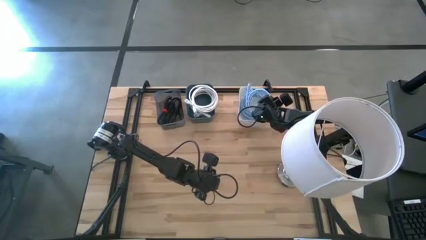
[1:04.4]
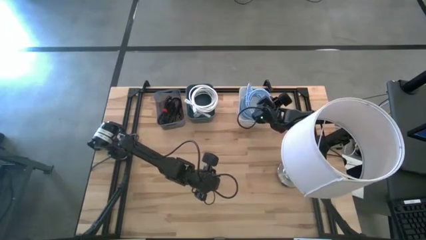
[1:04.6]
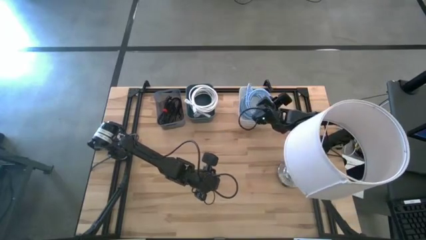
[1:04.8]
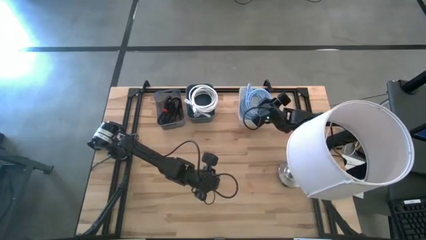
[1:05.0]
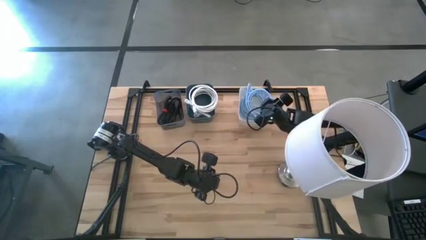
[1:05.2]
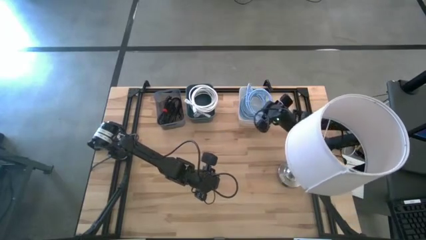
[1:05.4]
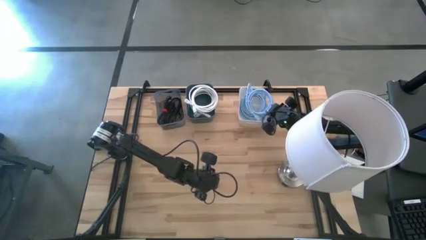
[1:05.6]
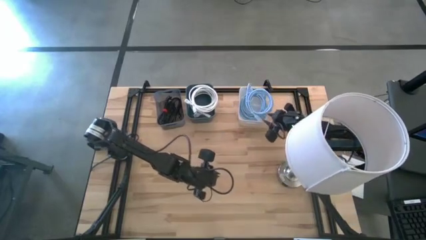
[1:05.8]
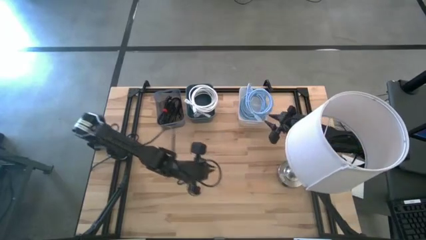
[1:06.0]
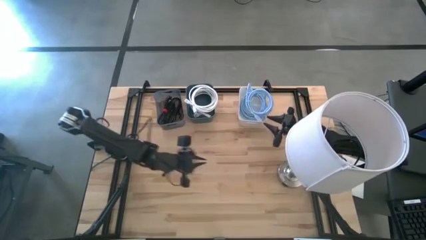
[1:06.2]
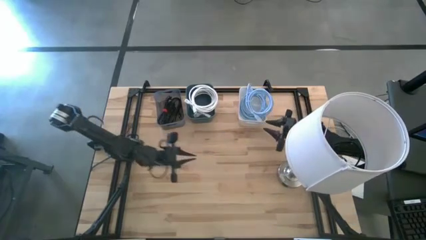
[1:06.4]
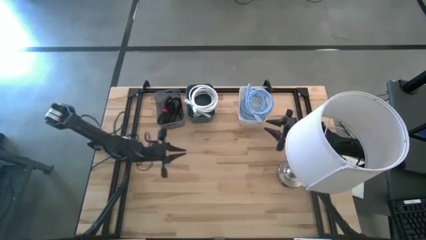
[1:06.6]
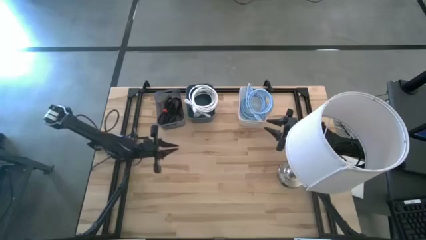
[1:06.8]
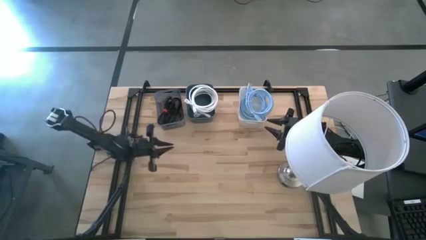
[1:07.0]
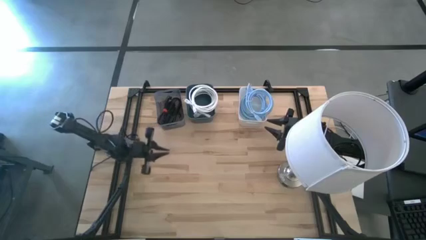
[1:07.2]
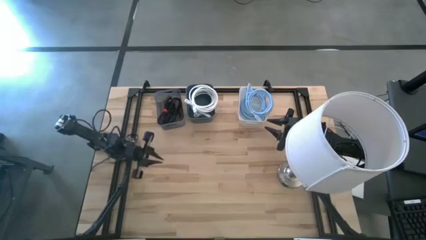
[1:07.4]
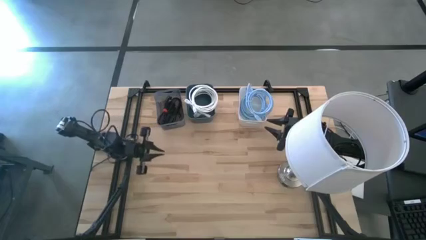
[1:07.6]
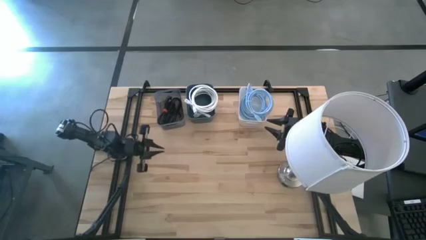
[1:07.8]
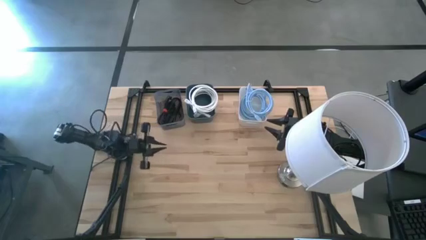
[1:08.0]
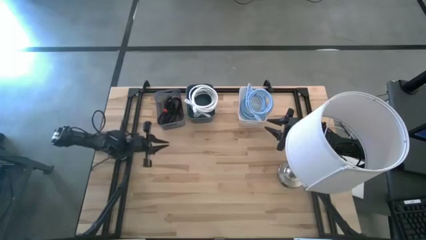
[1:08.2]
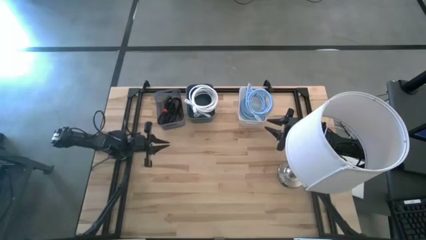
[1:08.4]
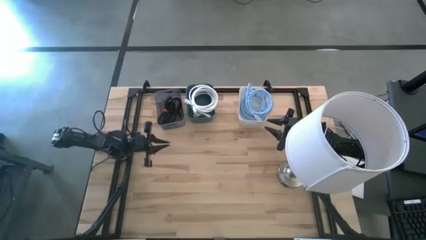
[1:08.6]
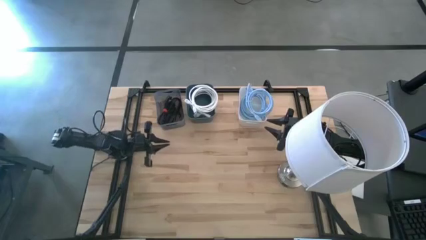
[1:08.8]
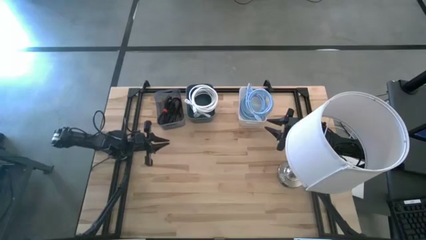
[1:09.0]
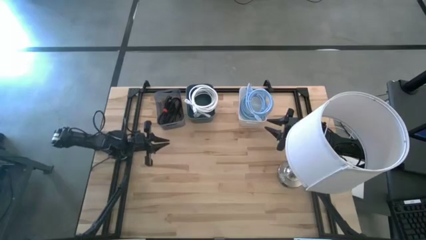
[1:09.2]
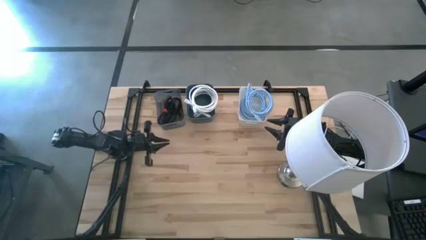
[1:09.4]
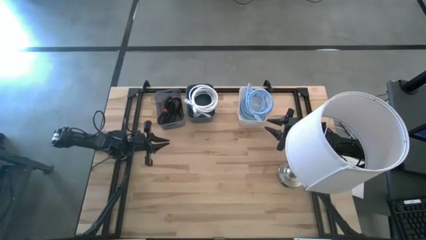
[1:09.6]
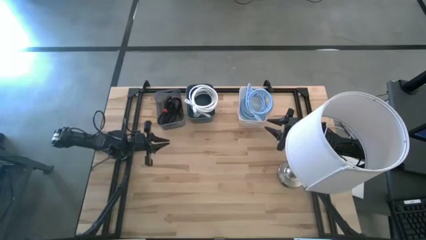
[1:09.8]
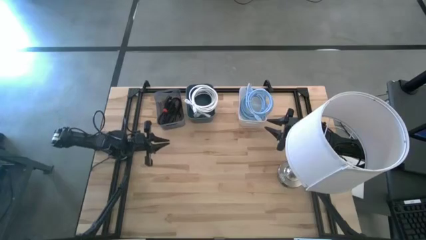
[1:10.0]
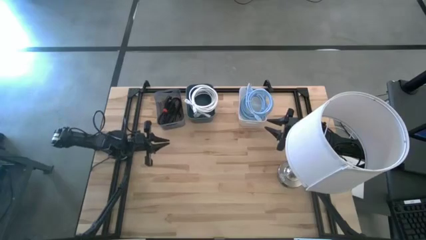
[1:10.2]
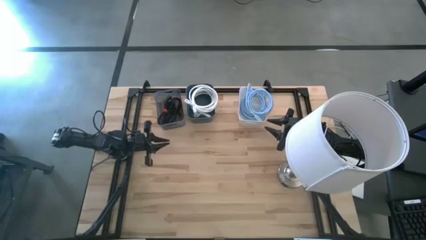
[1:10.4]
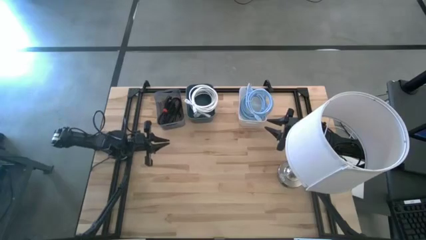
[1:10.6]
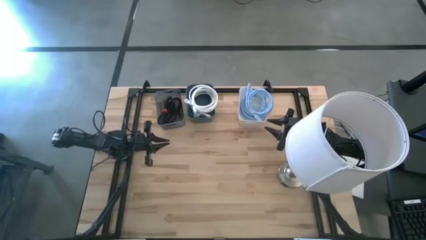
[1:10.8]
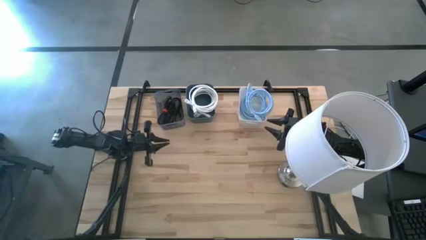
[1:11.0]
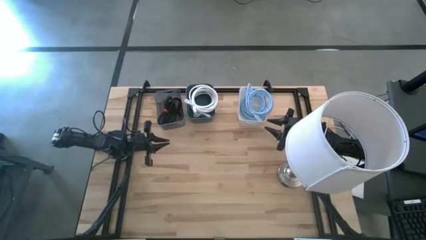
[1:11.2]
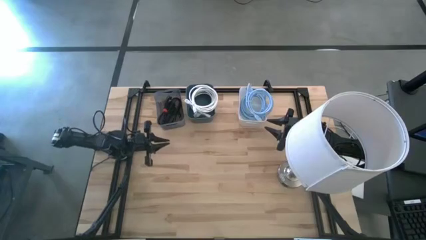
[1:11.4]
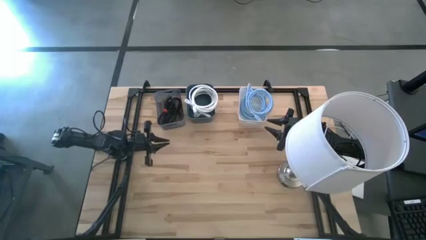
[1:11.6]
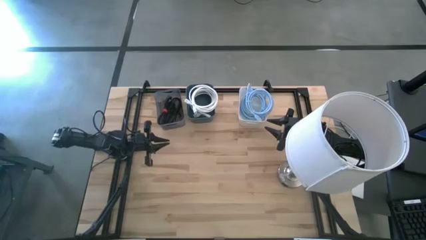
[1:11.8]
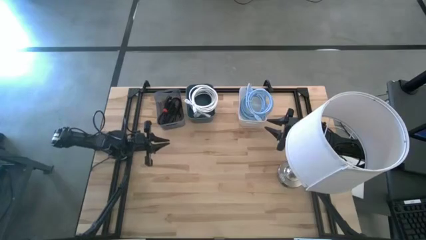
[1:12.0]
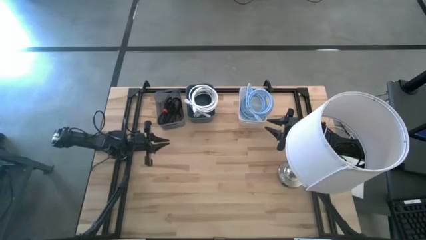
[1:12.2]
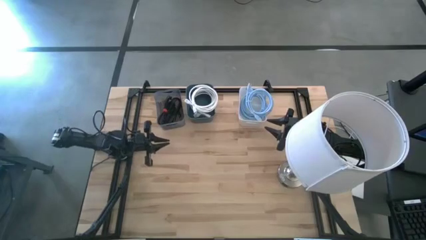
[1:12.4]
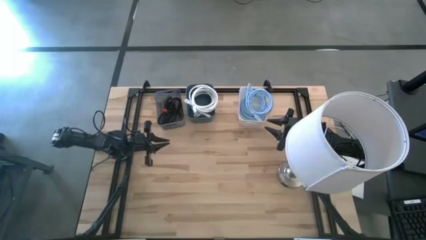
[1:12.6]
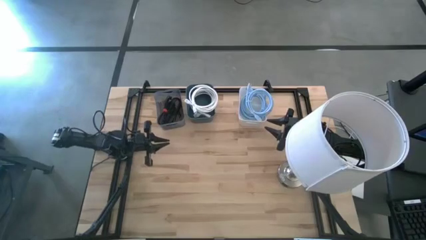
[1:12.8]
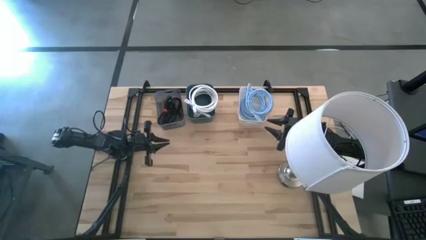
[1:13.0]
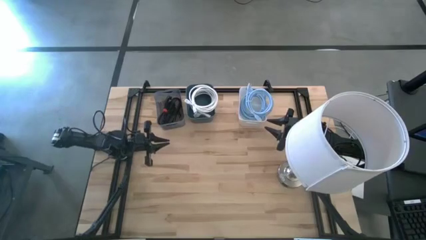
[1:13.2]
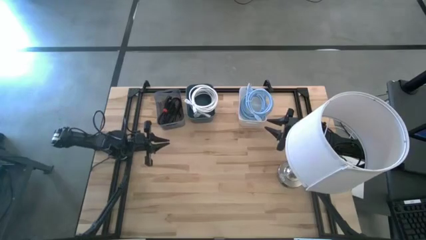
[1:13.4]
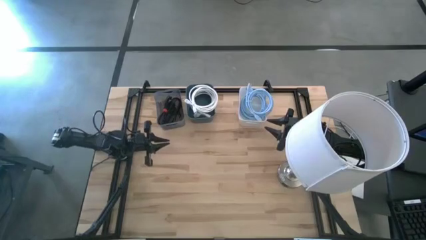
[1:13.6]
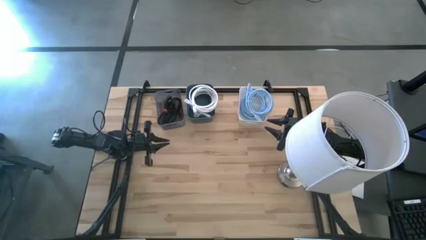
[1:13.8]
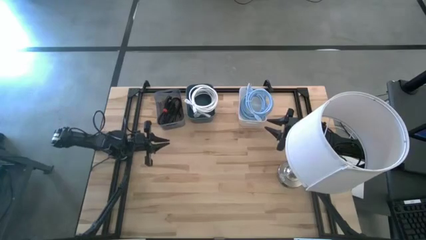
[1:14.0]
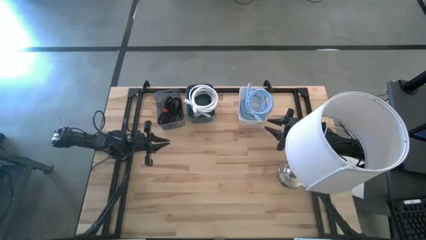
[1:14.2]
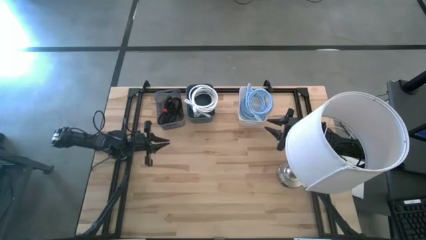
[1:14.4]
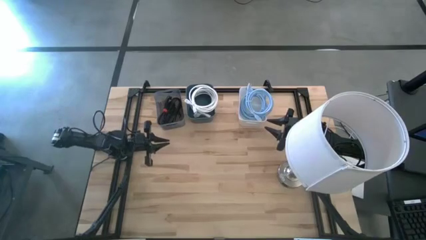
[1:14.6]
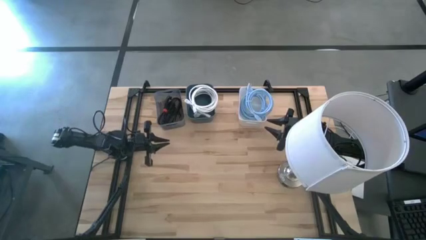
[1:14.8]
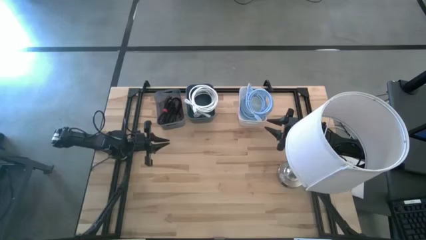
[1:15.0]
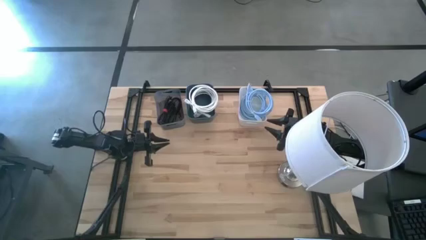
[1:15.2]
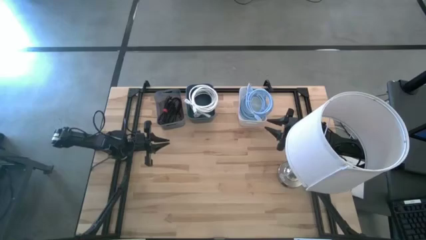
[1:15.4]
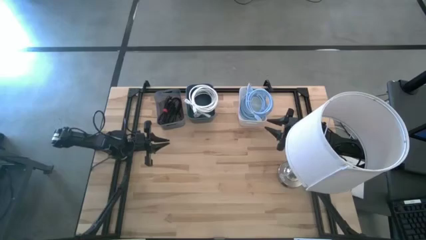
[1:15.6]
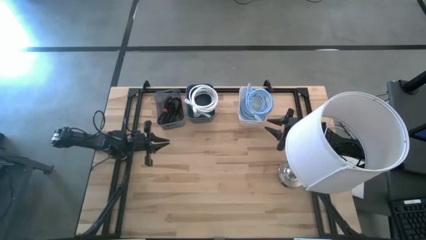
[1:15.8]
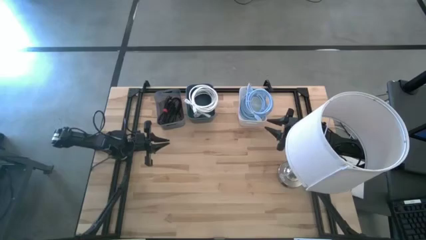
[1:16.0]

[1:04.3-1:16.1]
Task: Sort HDMI cables
Return to Home Position

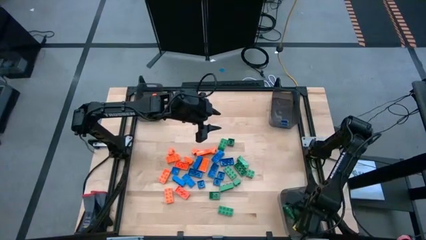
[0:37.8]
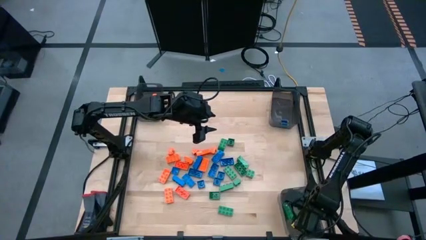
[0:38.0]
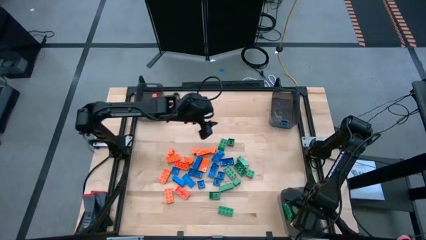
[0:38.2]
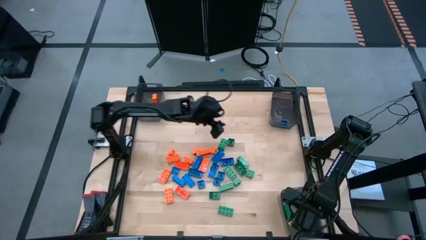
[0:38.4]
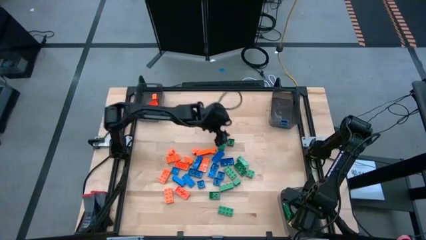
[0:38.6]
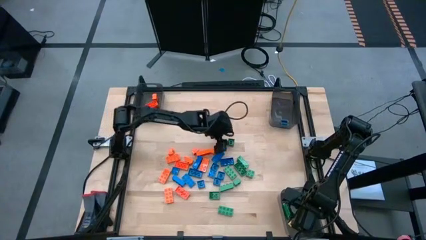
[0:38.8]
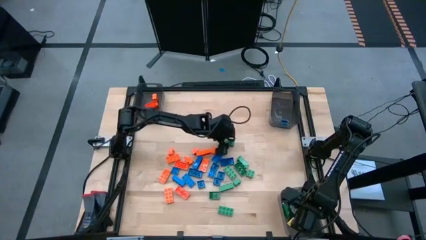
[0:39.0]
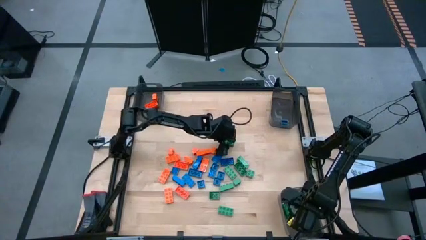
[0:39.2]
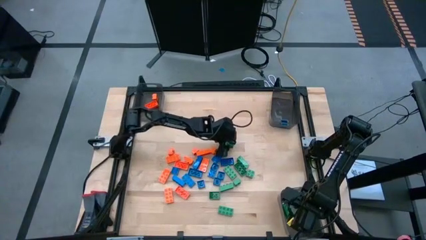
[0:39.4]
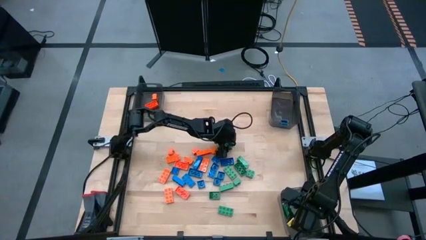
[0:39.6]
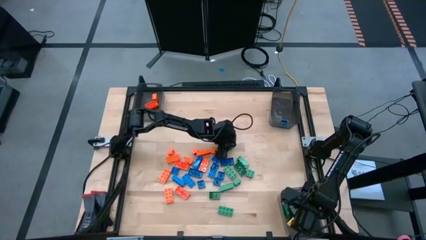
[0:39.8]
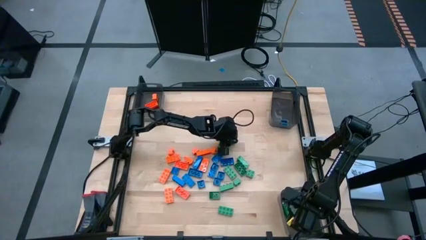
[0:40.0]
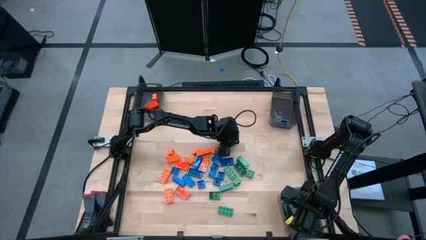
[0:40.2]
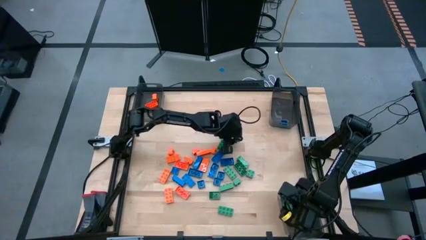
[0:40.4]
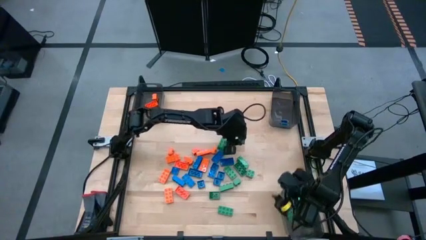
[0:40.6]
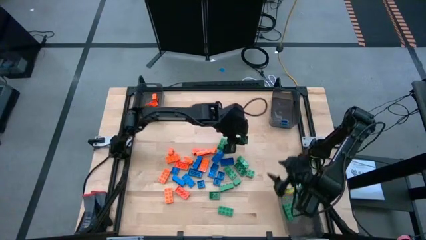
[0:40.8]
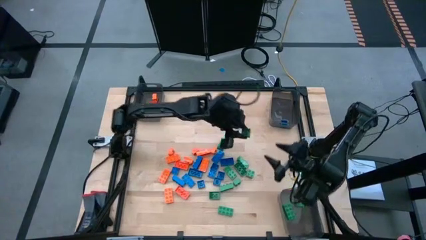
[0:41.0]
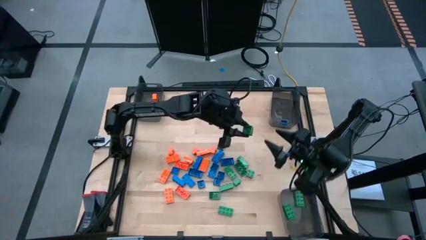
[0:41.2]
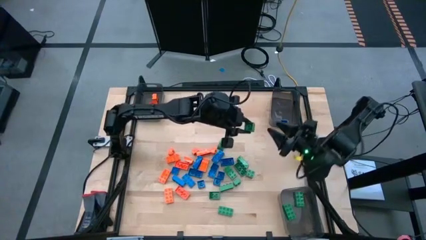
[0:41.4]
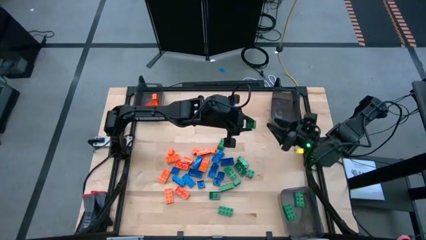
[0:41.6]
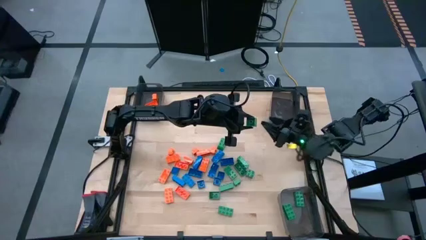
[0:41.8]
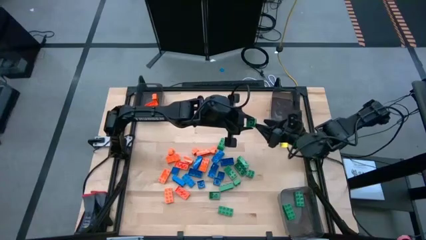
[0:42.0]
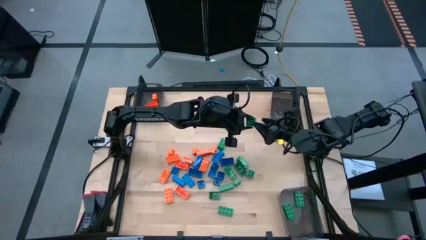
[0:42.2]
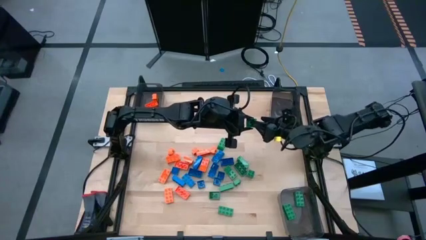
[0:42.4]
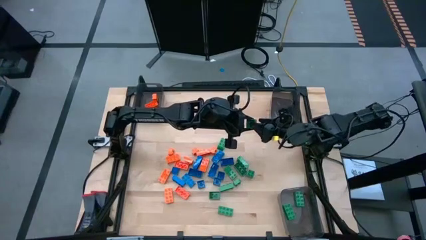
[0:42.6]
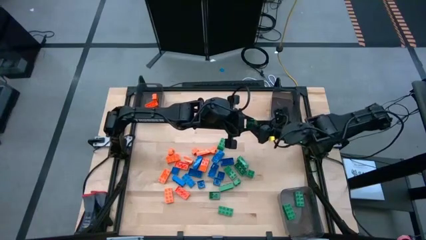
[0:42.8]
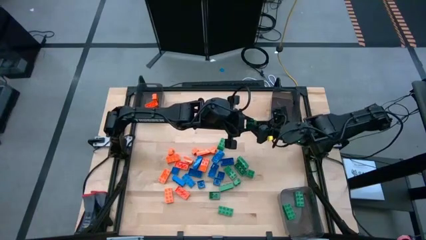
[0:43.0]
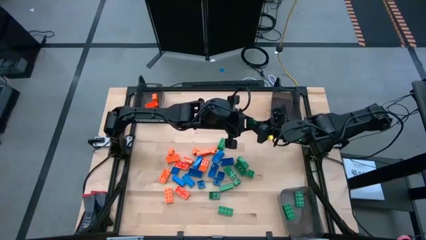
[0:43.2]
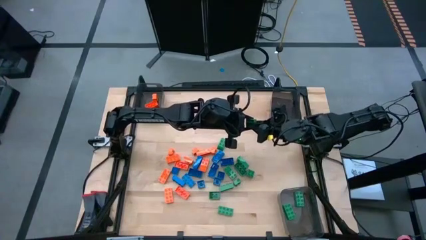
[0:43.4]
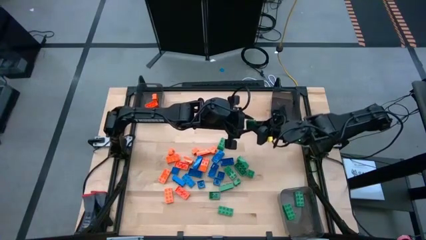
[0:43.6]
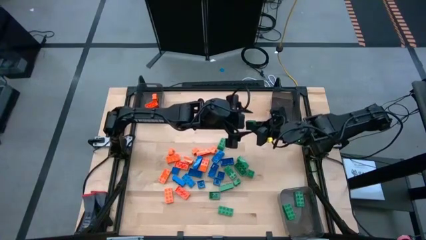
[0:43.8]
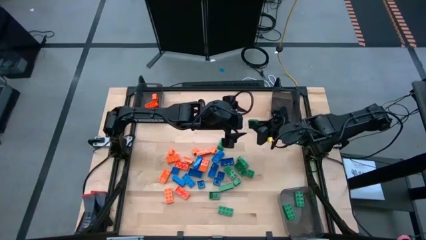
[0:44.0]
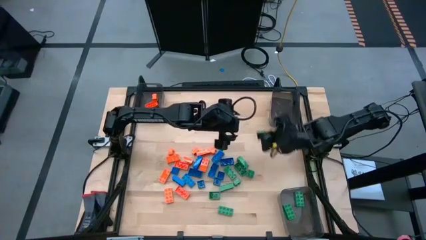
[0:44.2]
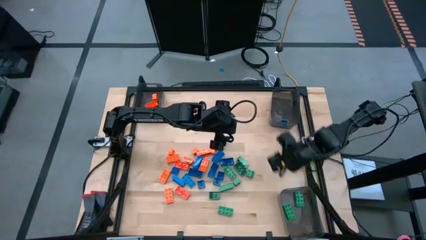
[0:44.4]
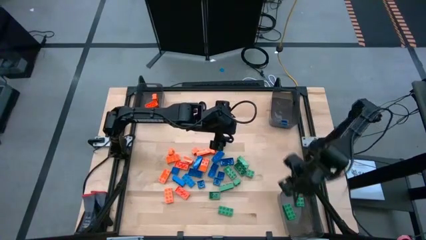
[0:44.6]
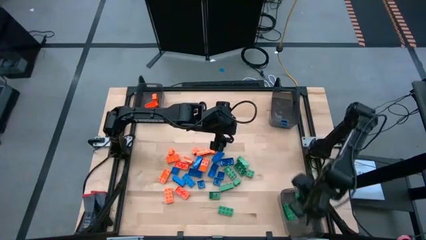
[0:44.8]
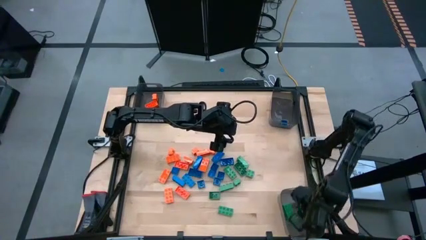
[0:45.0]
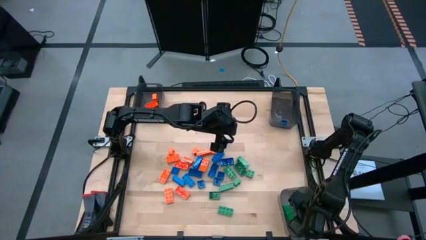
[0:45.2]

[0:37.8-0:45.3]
Task: Sort blocks
Put the green game piece into the bottom right black bin
